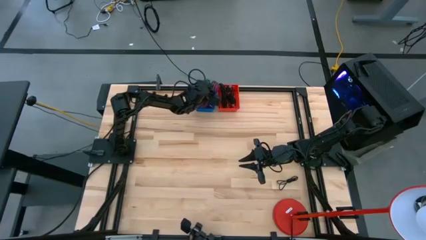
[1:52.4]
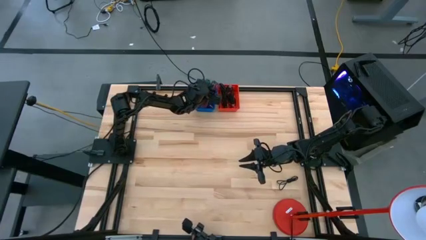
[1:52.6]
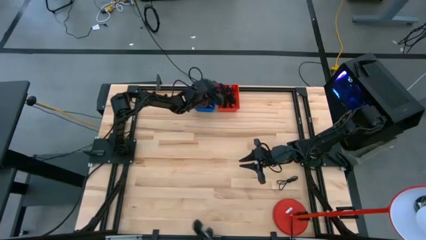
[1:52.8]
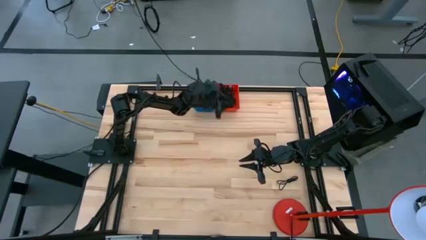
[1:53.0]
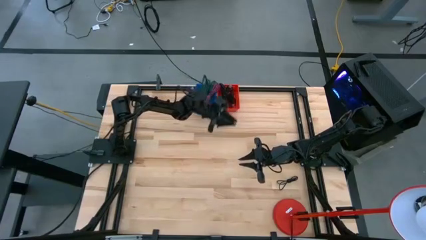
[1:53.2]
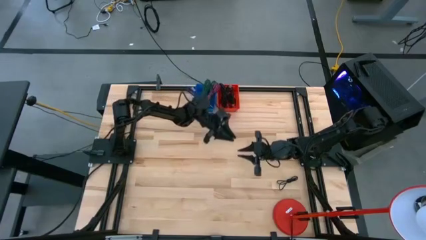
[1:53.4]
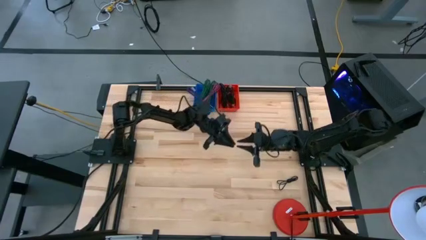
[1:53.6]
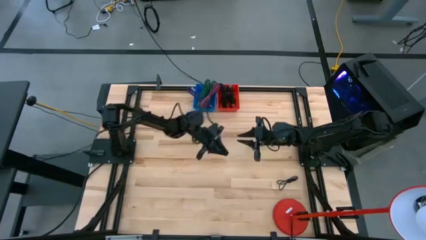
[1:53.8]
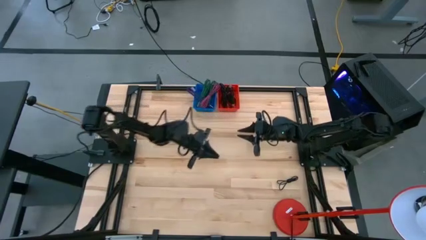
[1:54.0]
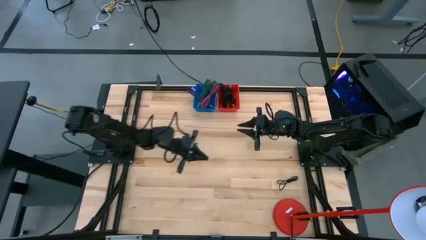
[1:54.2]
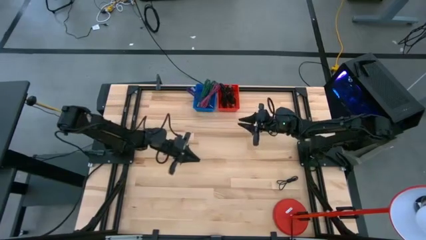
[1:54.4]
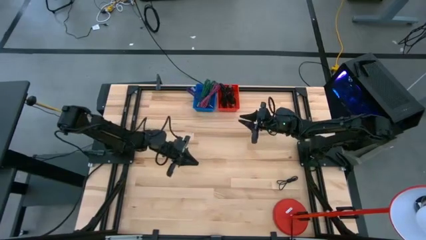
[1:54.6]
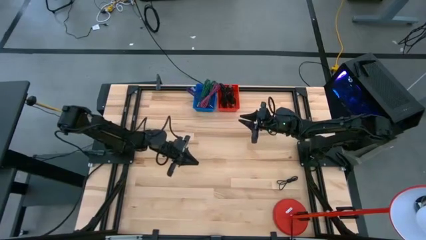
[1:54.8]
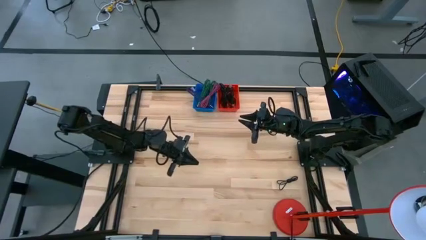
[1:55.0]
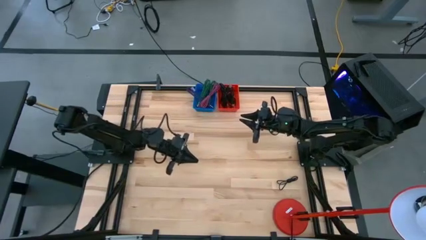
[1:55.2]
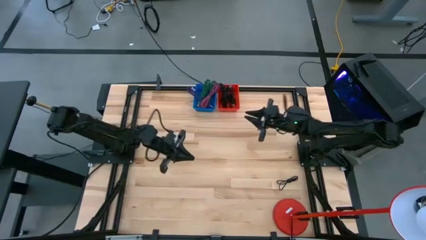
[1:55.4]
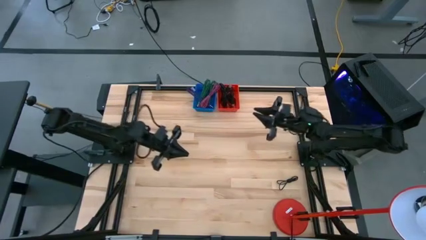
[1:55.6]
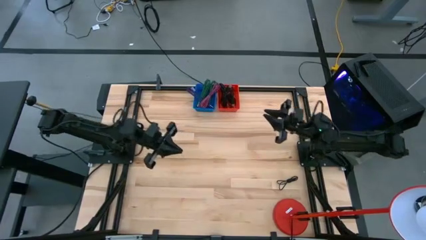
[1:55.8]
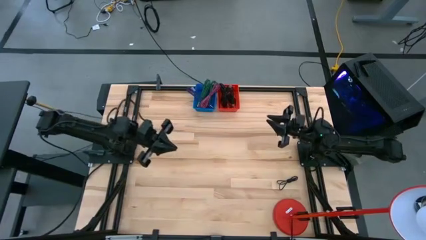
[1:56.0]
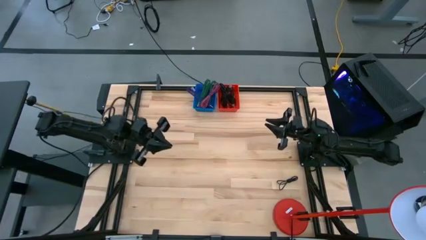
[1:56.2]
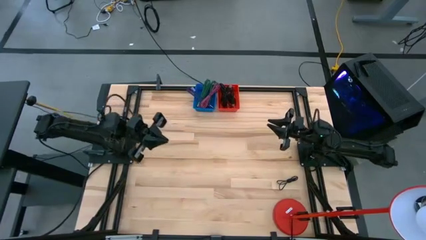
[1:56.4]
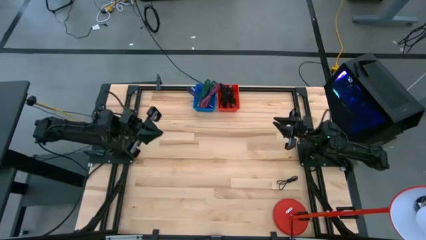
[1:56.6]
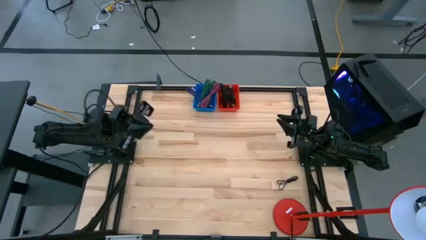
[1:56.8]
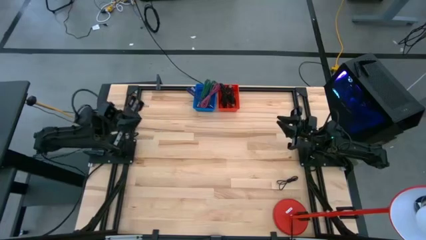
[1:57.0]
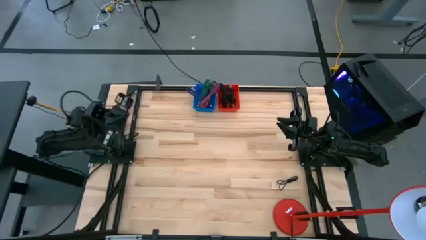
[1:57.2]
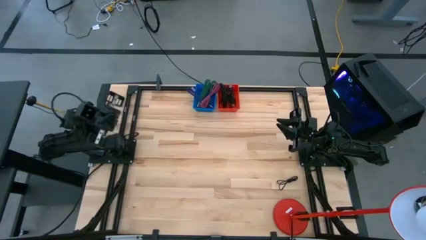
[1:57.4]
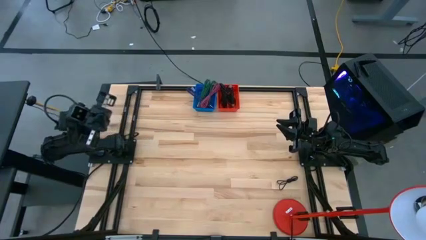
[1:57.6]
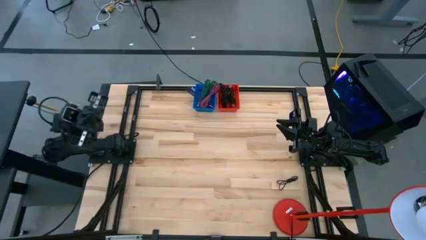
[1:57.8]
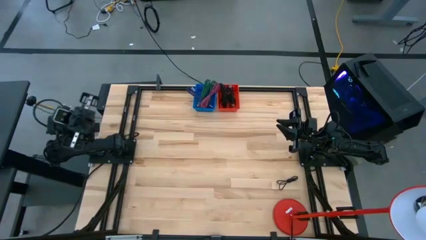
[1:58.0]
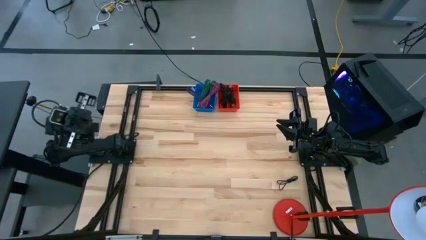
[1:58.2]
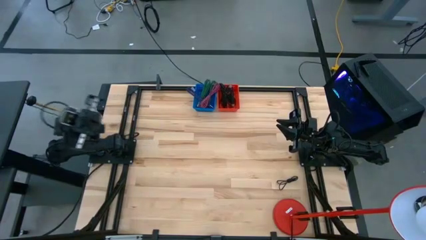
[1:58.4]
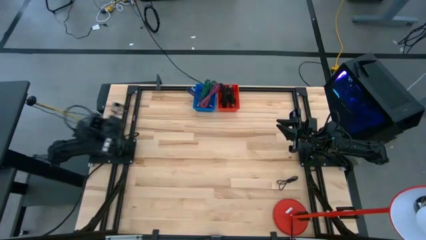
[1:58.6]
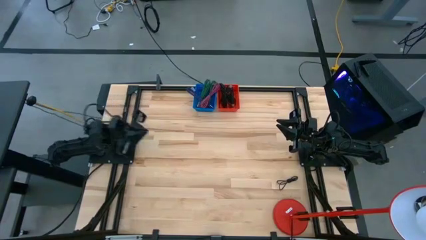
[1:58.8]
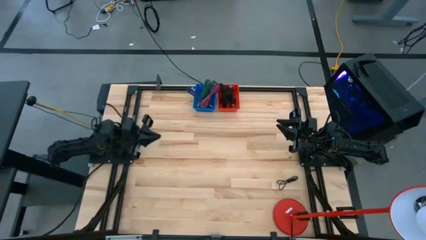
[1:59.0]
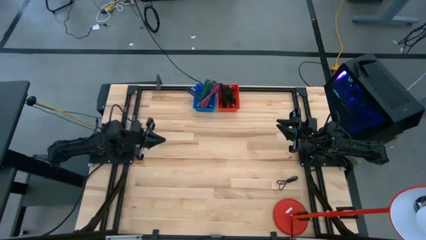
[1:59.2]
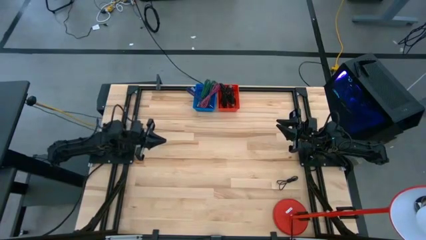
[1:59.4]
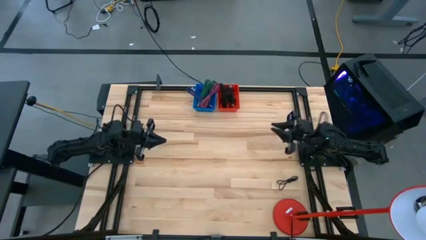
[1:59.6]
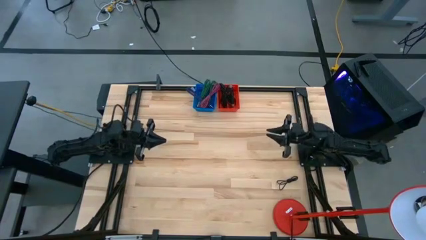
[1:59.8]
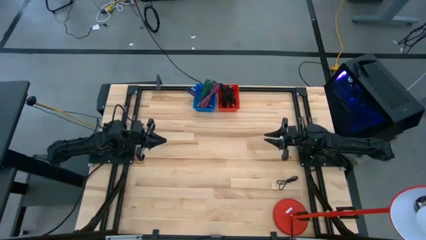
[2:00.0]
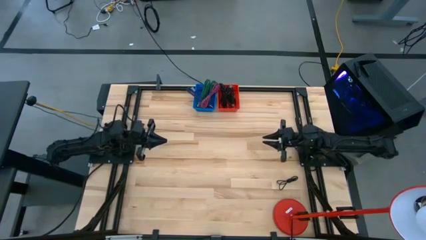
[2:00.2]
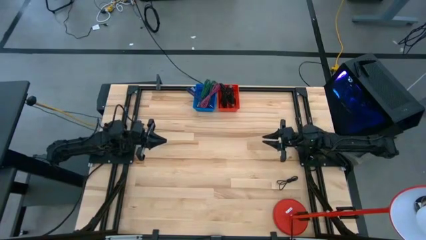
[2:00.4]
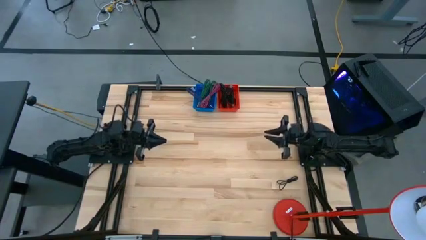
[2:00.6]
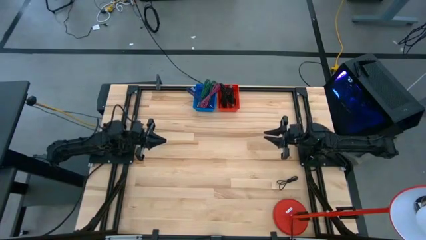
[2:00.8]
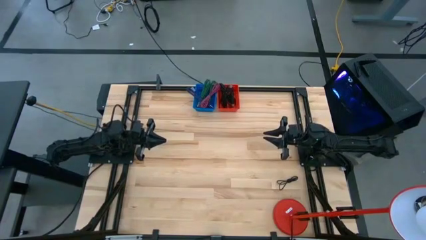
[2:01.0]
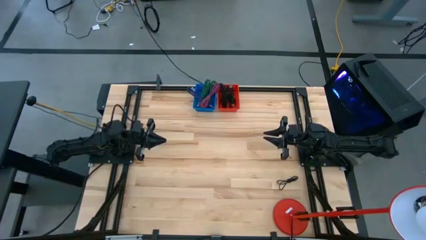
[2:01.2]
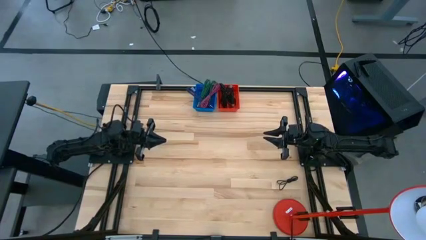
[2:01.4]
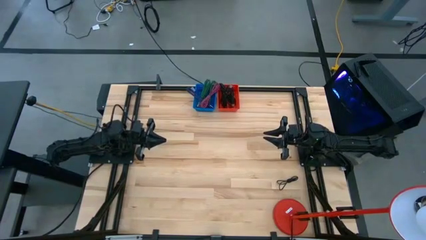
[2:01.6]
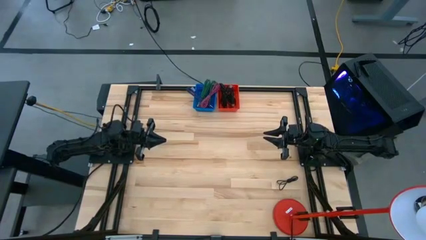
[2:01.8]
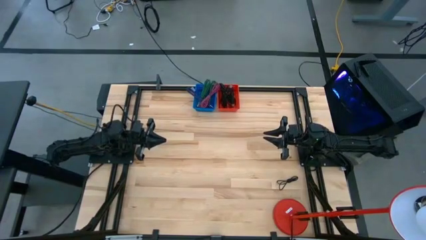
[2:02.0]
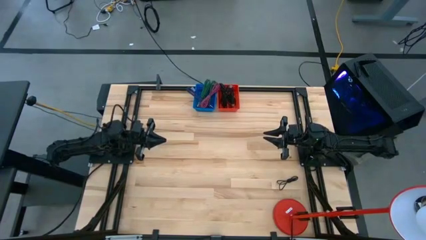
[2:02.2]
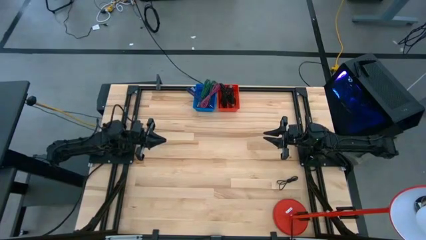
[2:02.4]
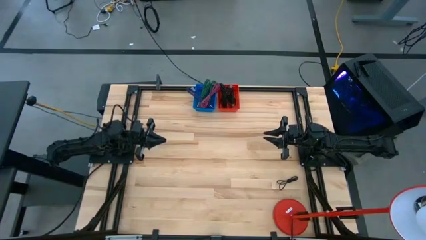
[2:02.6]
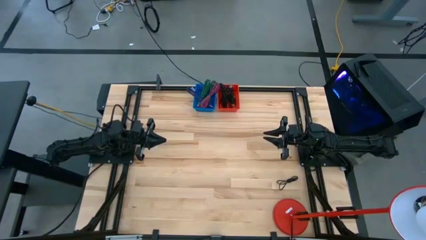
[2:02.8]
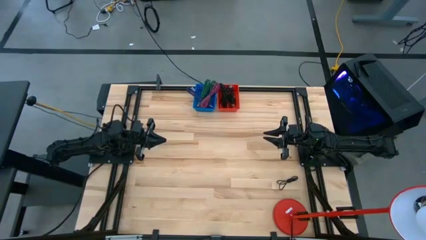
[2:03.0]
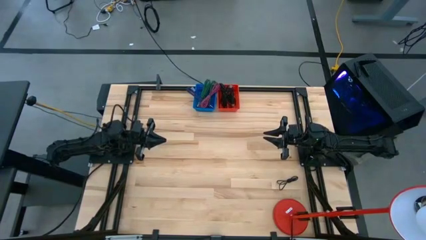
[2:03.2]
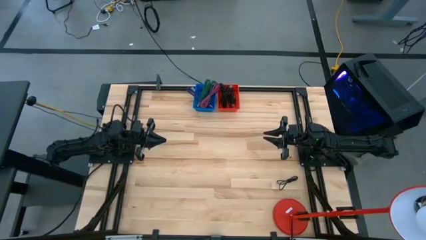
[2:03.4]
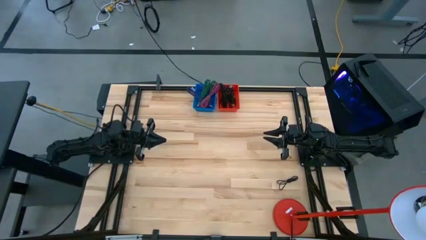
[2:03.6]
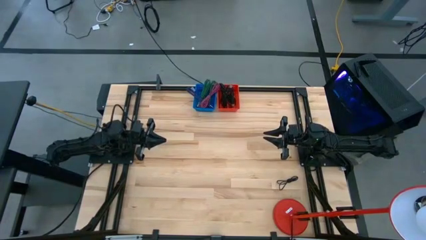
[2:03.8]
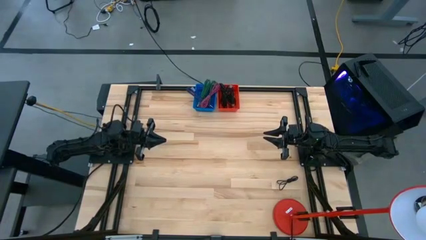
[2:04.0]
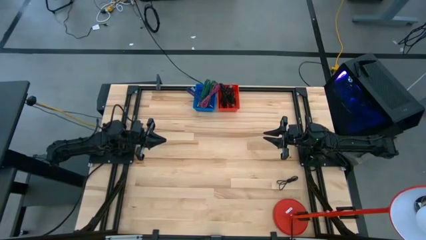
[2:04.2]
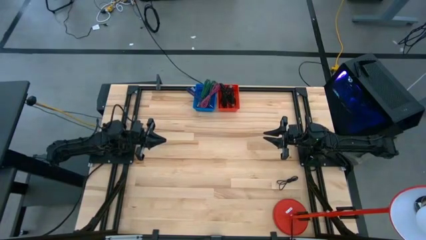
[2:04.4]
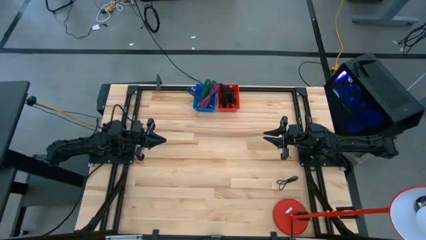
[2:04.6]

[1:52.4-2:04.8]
Task: Pick & Place USB Port
Return to Home Position

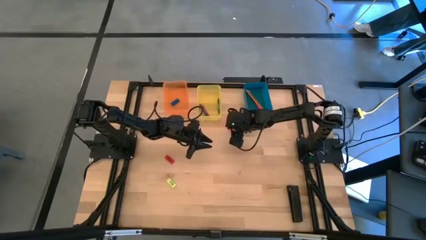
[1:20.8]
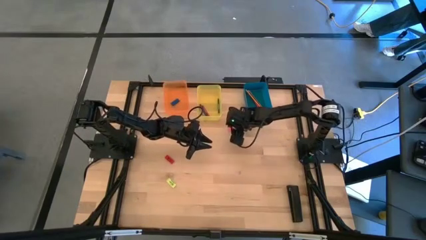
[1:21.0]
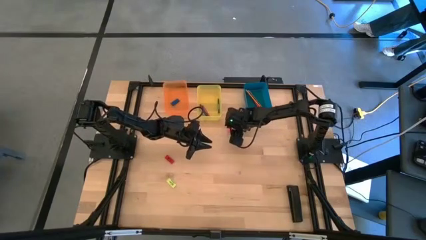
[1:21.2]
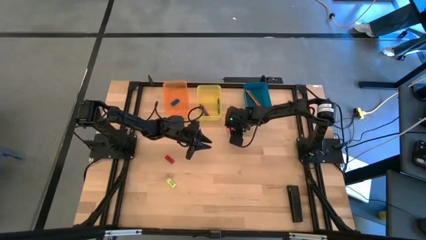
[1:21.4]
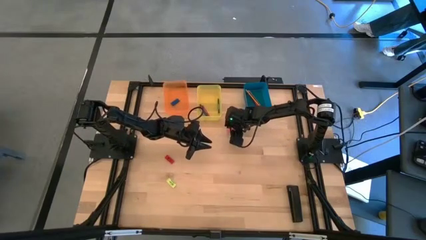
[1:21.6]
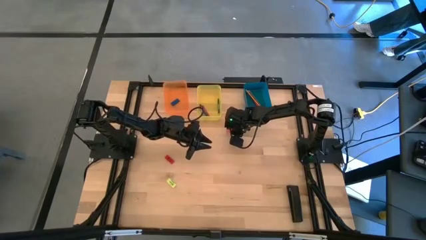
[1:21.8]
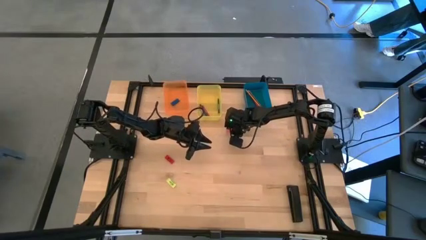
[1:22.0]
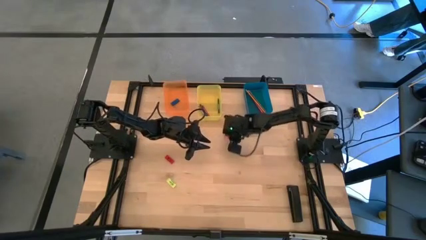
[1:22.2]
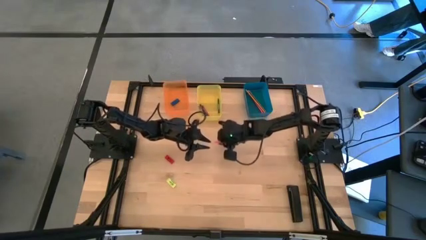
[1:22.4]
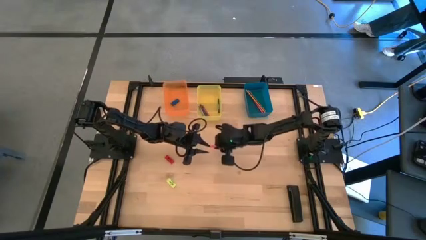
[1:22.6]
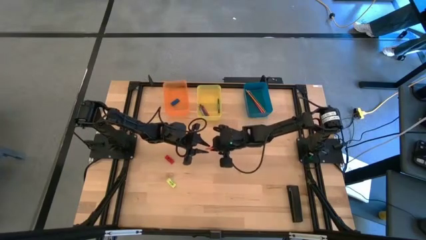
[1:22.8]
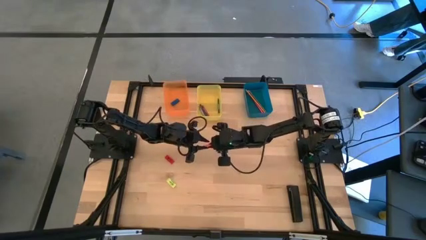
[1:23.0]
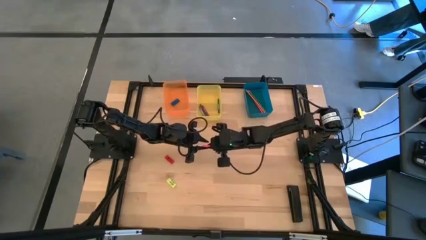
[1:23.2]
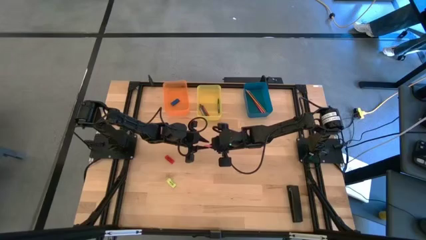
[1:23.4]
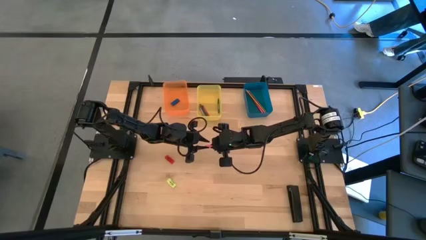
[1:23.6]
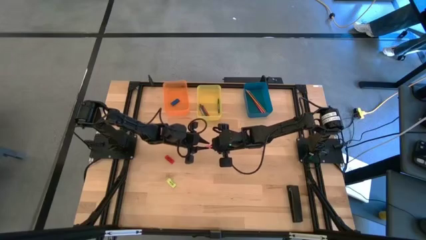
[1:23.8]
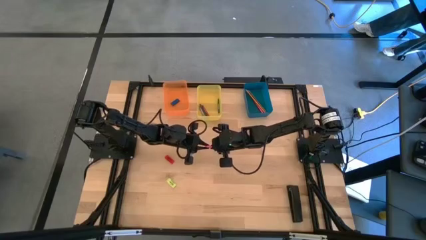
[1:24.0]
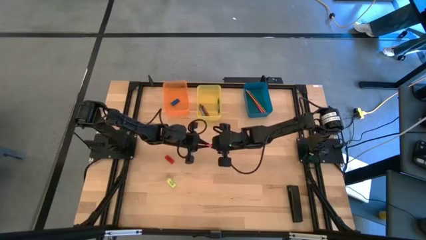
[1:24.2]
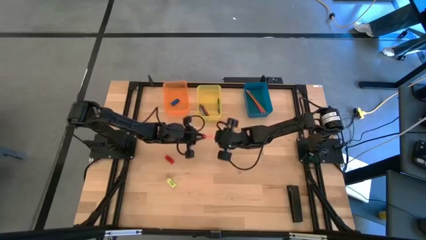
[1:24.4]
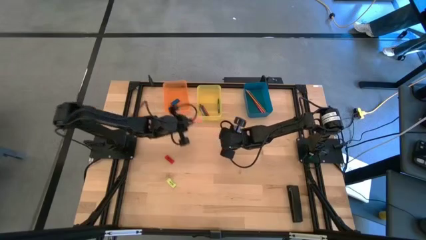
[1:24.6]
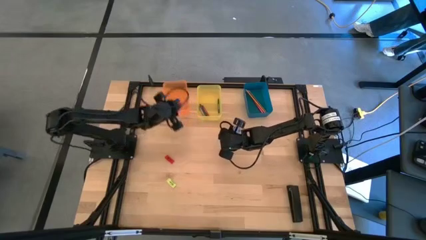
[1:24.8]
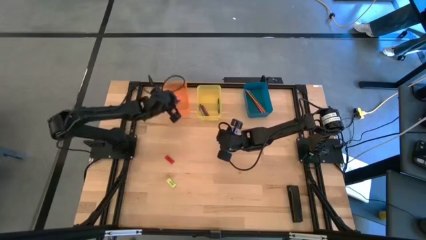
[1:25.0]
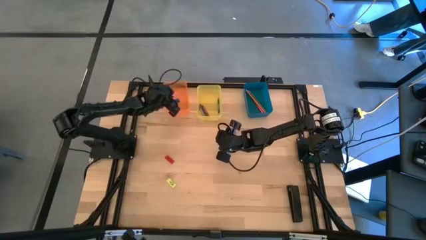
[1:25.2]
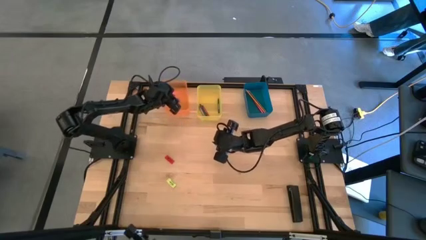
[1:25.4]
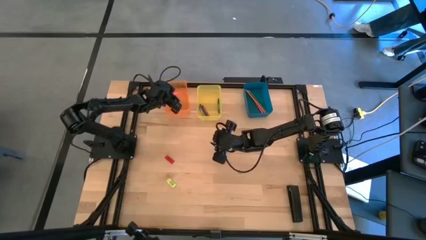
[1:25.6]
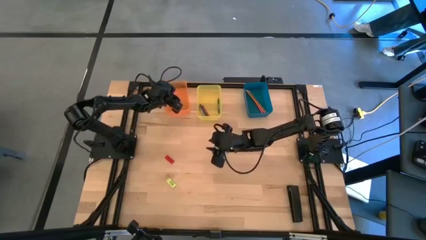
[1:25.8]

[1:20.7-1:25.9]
Task: Sort crayons/erasers/pens/pencils in bins
Put the pink eraser into the orange bin
